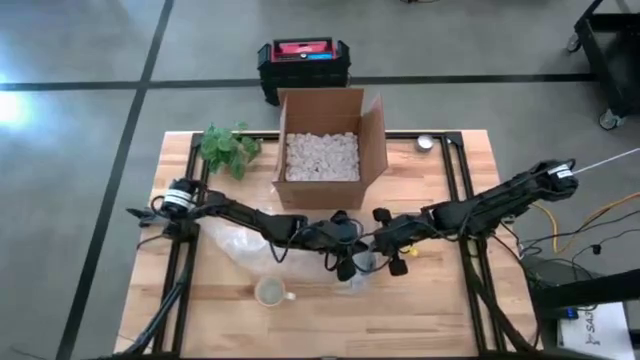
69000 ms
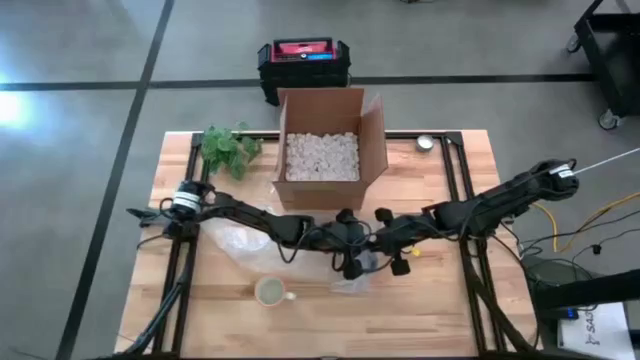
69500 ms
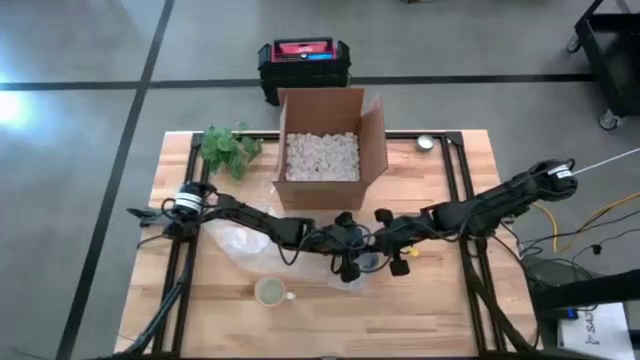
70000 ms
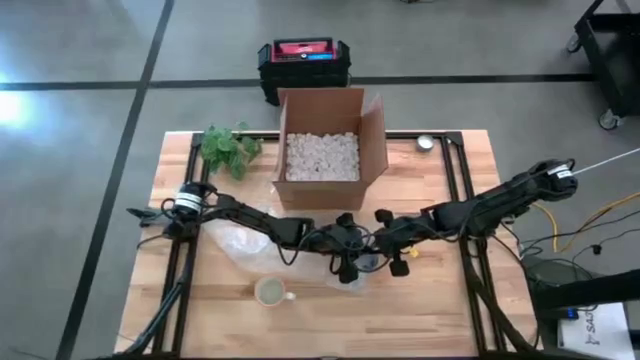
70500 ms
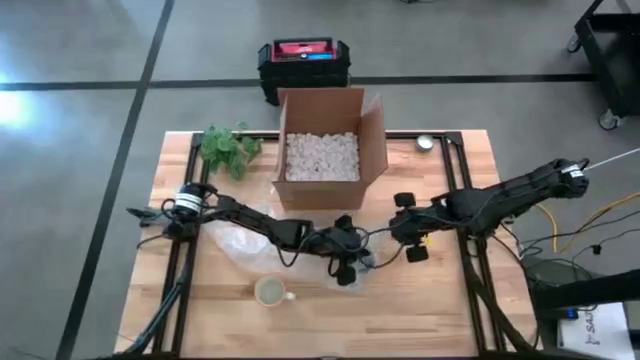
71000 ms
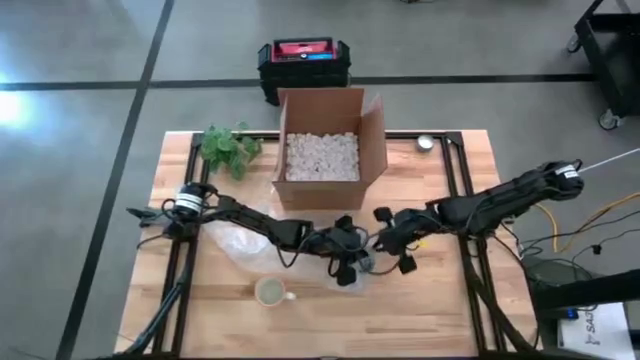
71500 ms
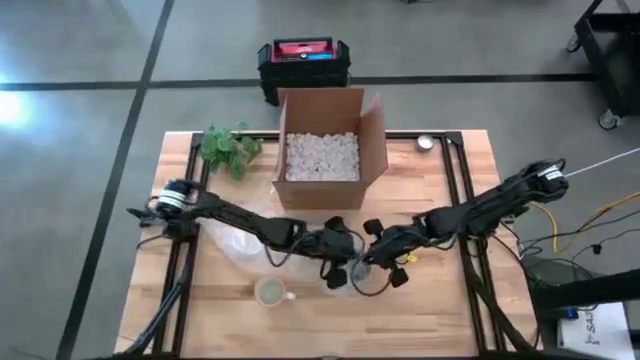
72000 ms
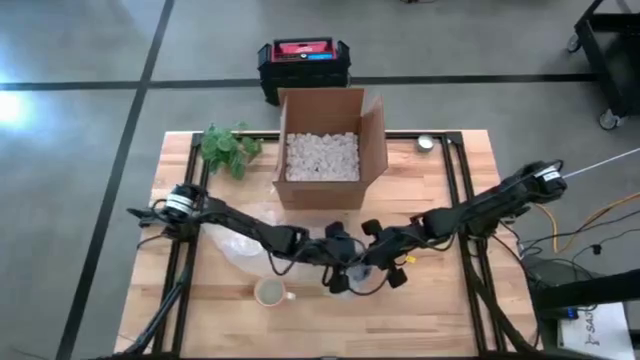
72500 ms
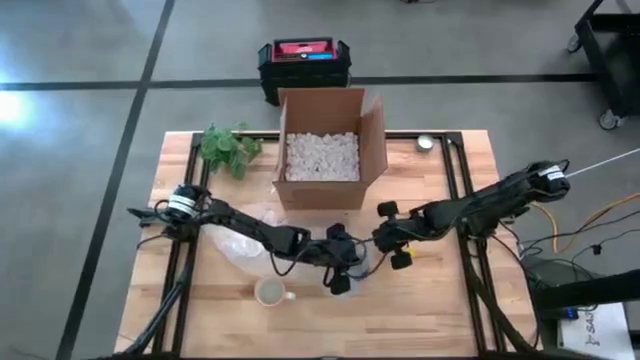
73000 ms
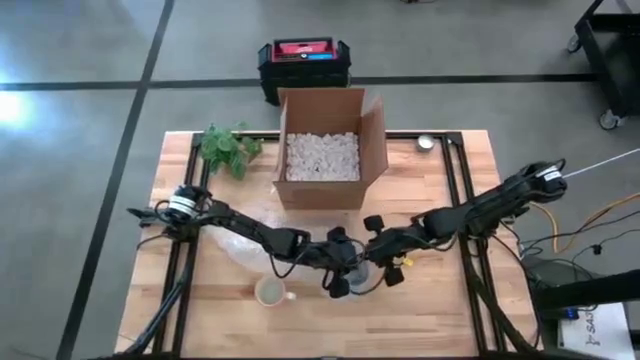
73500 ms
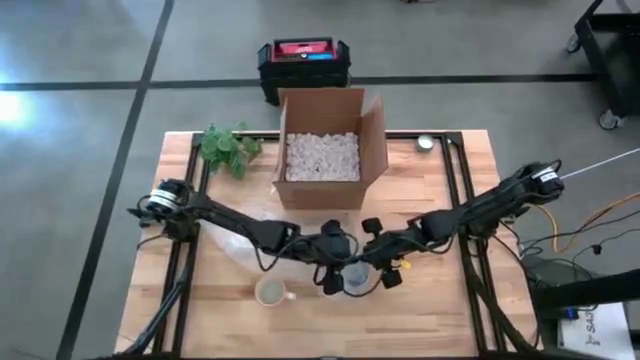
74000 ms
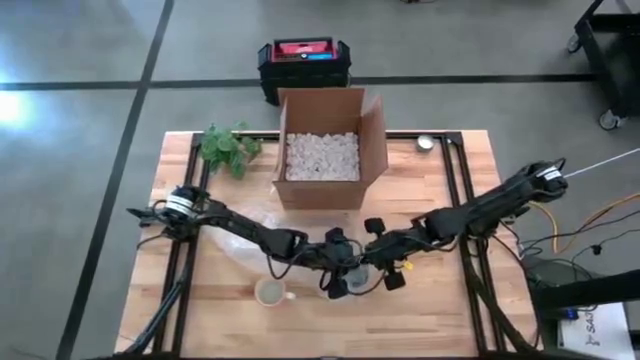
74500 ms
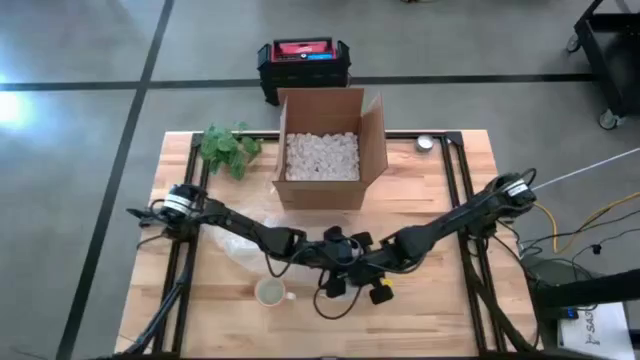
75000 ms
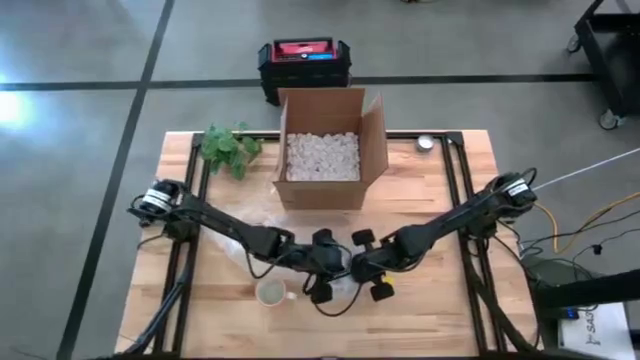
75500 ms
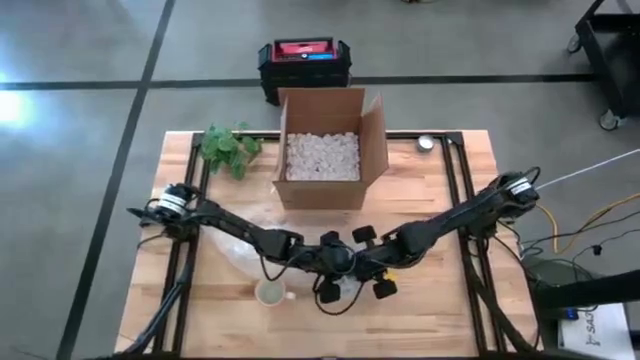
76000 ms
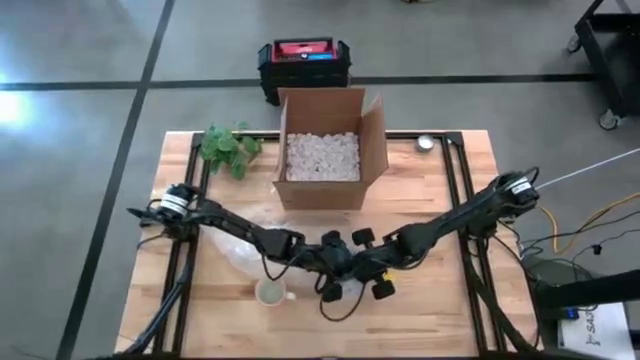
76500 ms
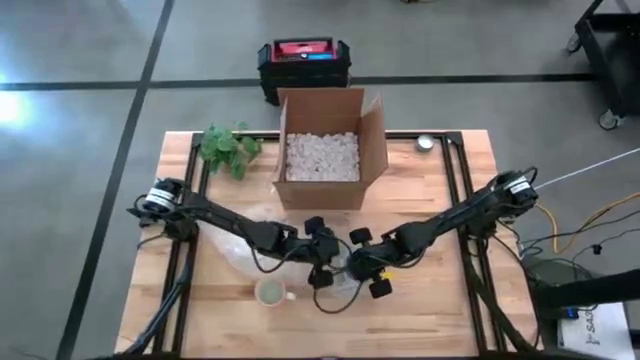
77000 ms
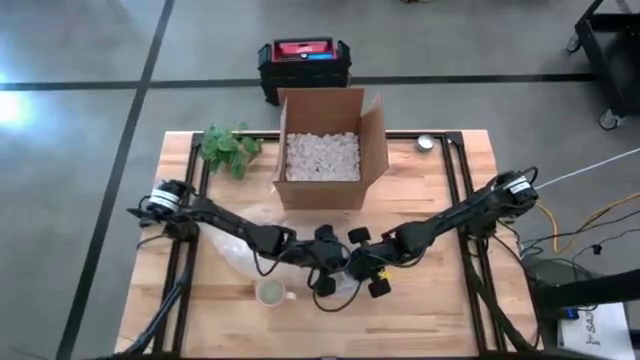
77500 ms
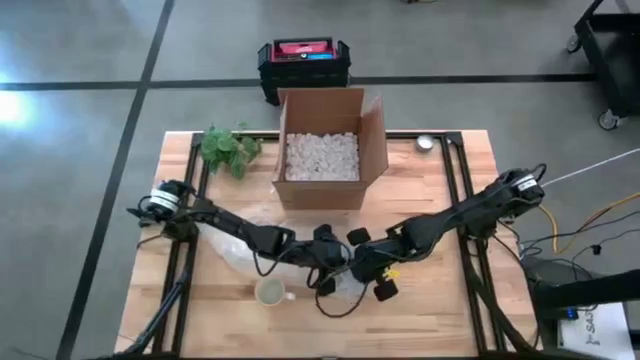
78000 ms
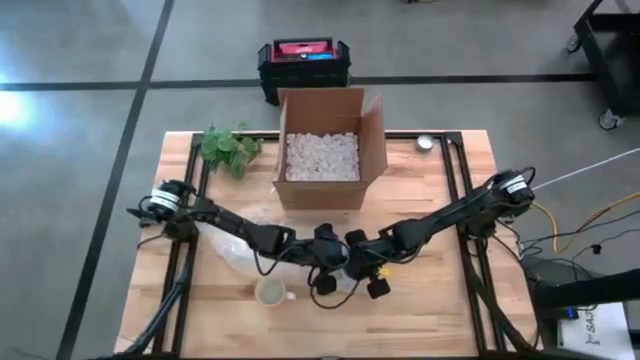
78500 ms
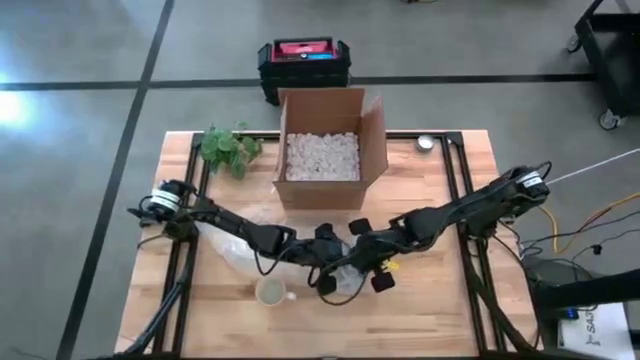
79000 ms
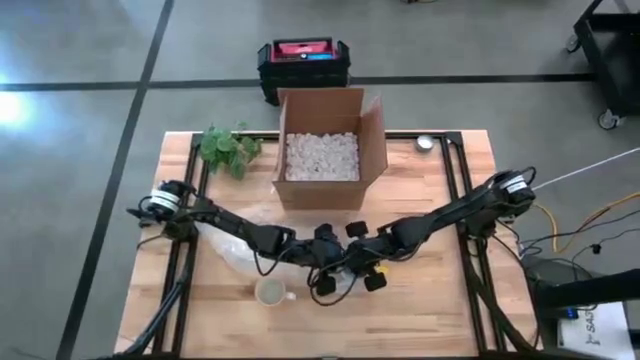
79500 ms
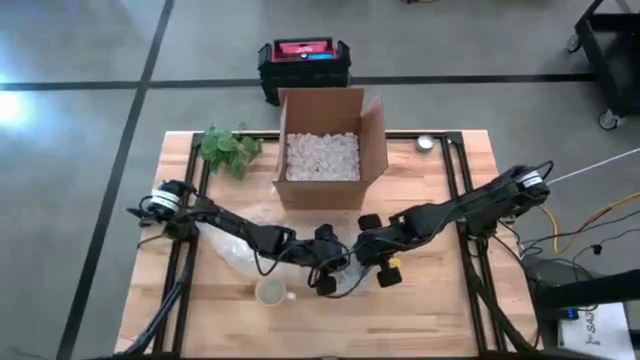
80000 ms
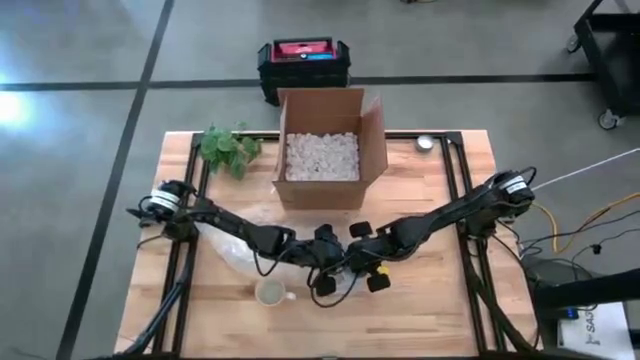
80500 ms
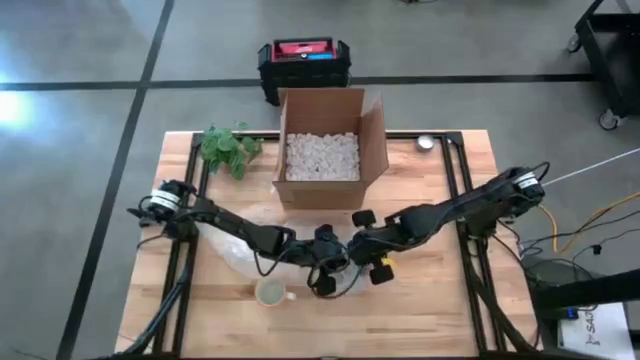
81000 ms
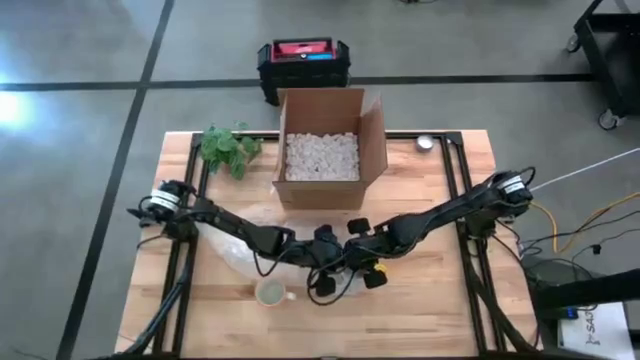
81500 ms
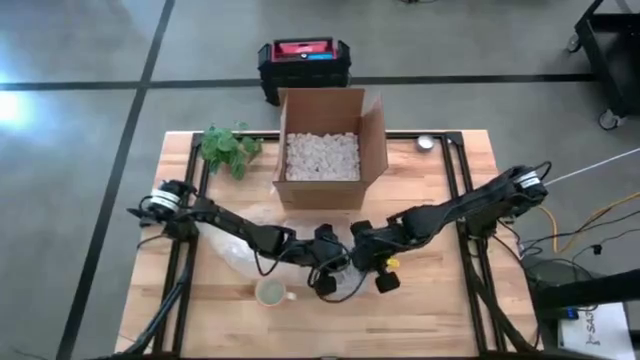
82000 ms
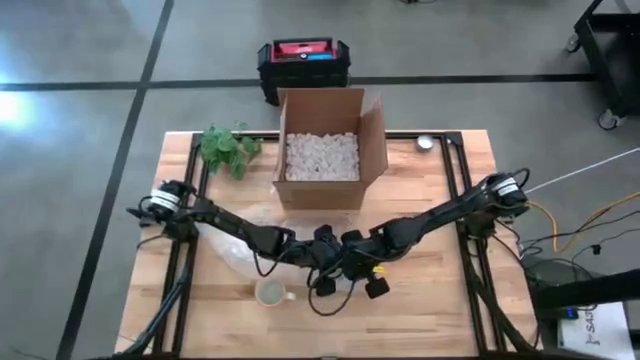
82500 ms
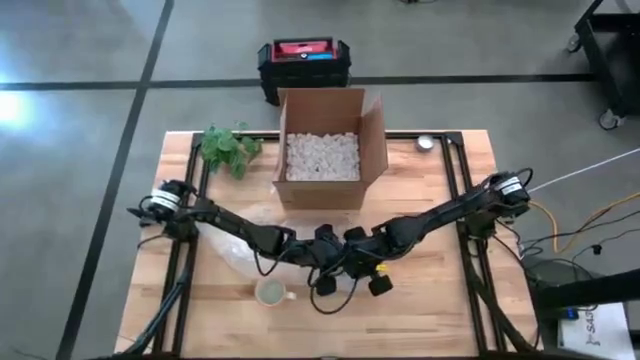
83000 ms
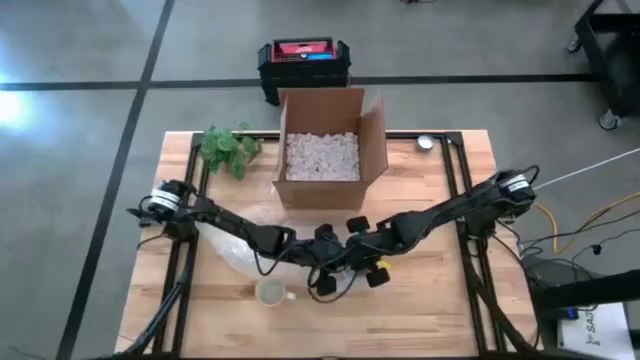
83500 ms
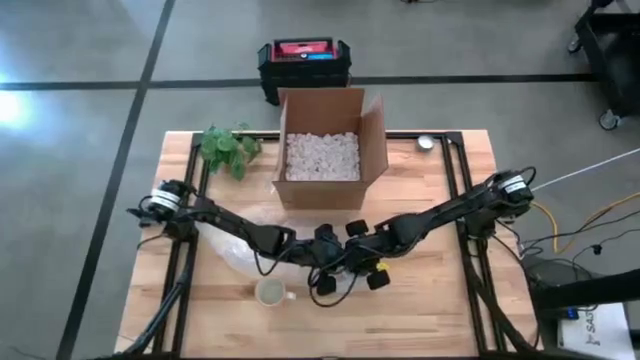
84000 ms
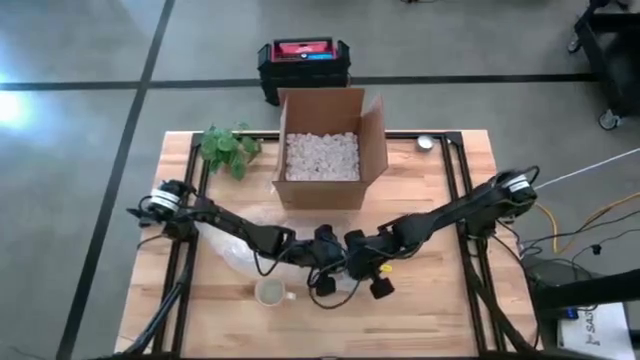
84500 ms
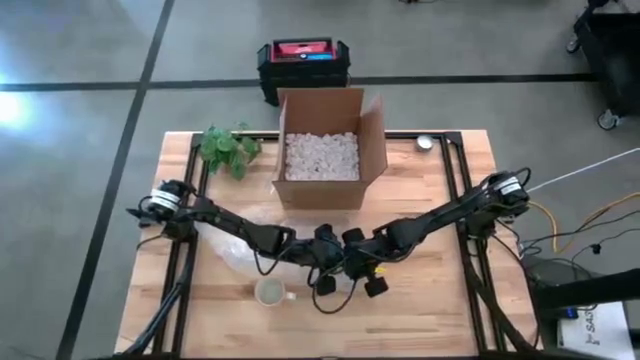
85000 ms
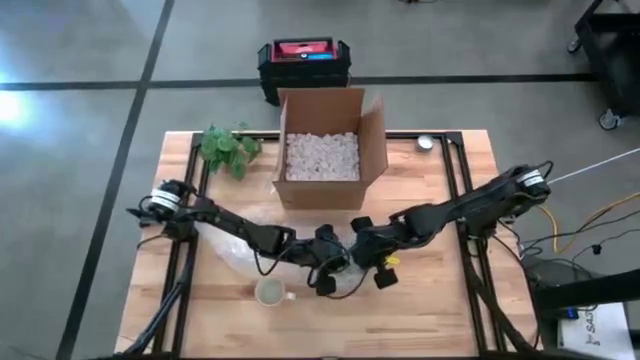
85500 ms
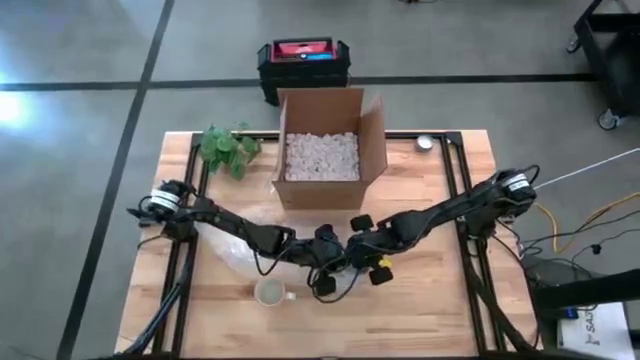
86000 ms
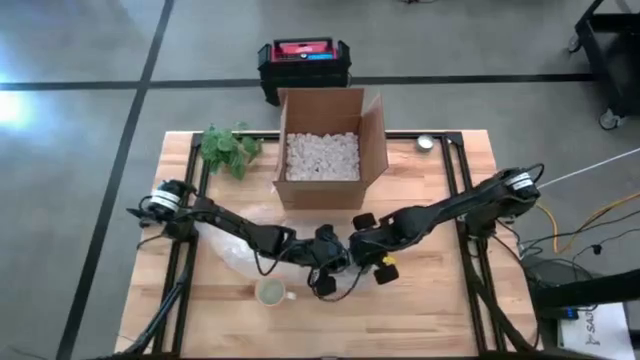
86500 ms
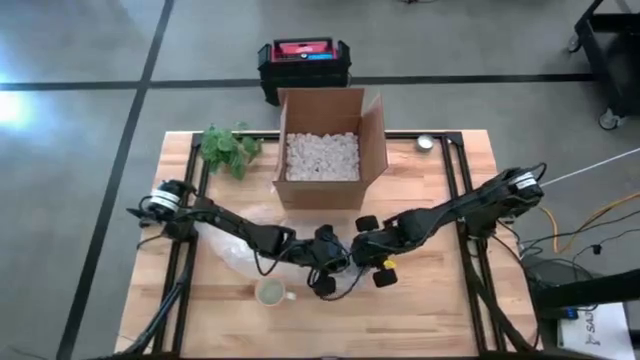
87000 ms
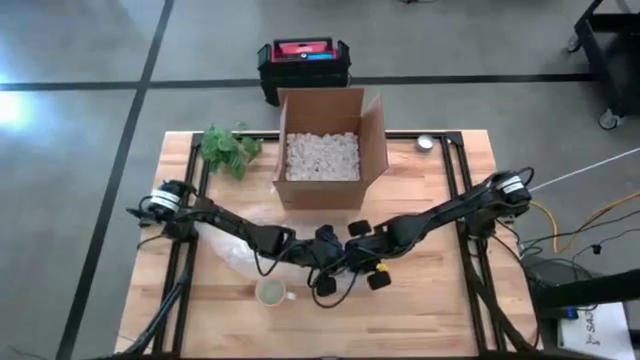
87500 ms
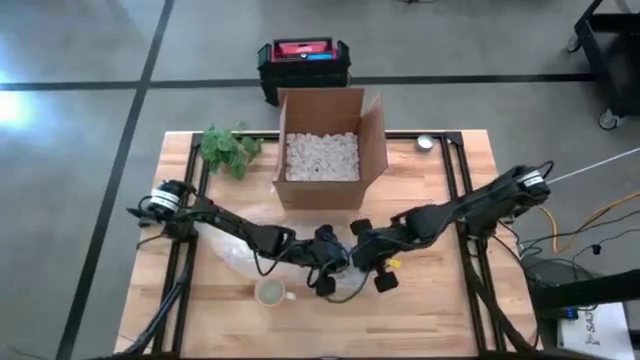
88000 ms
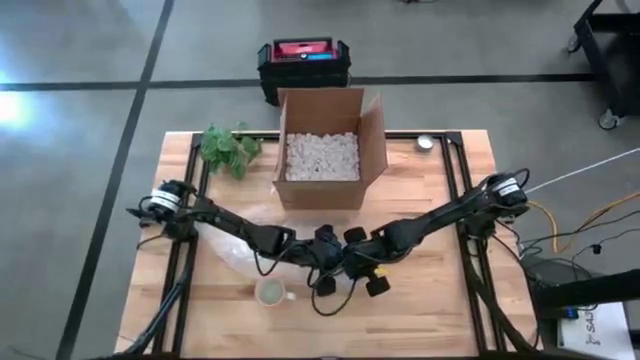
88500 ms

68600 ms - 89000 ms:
Task: wrap mug
Wrap the blue mug with the right bubble wrap

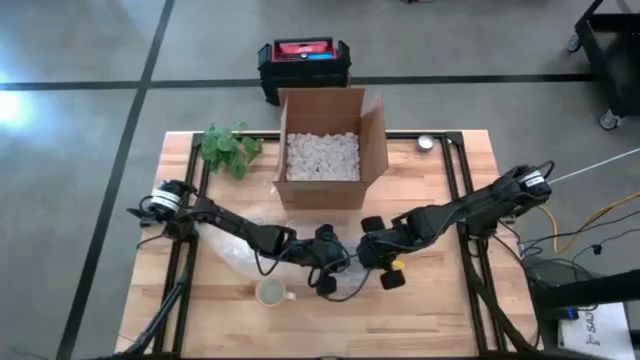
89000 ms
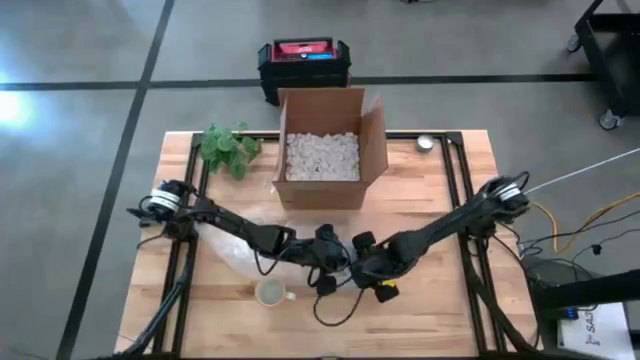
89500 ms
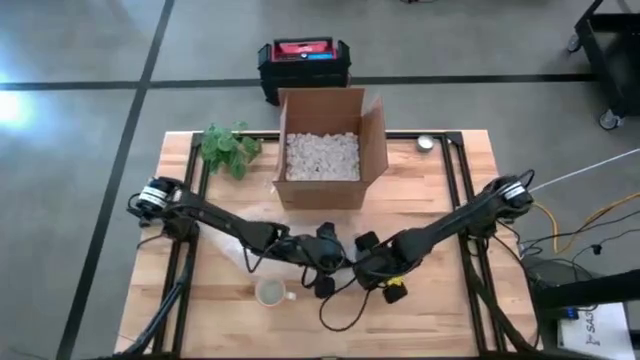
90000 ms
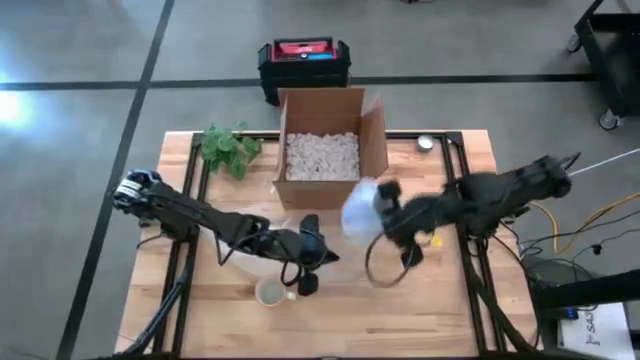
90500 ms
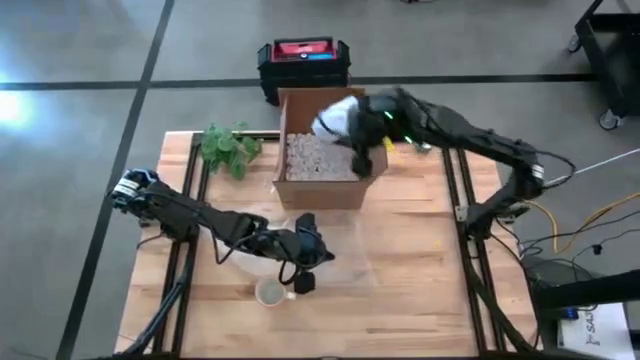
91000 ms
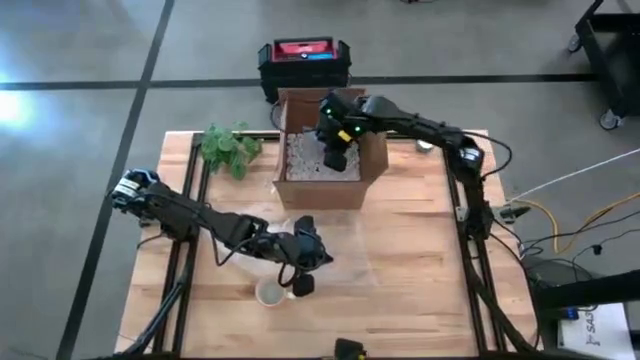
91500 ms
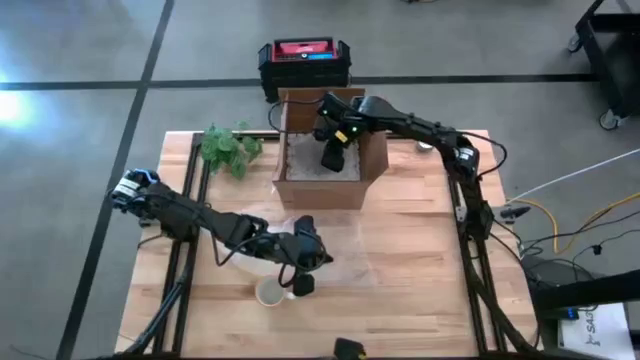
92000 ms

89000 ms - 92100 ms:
Put the wrapped blue mug into the cardboard box
